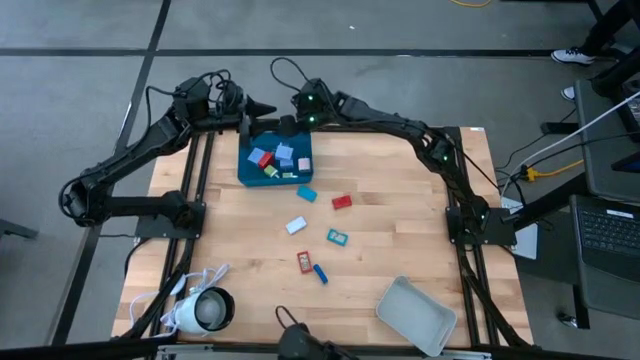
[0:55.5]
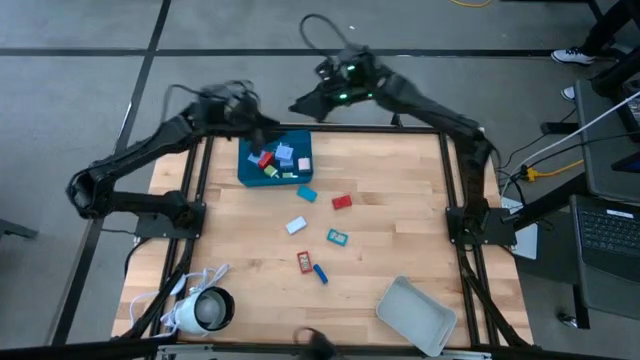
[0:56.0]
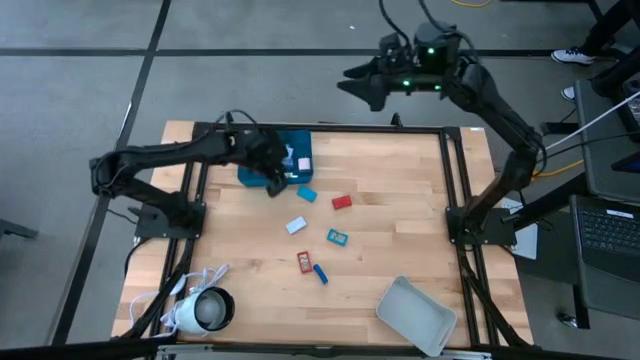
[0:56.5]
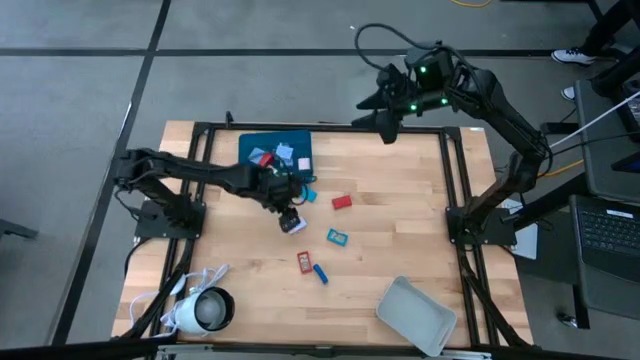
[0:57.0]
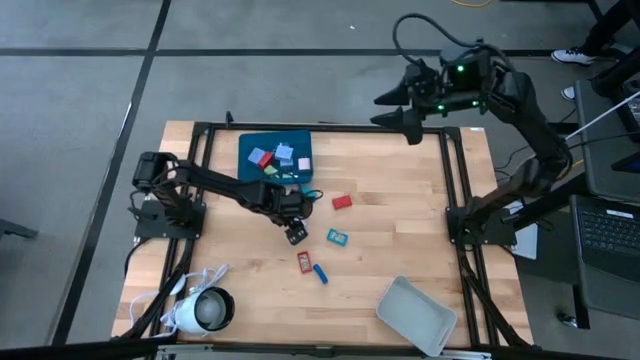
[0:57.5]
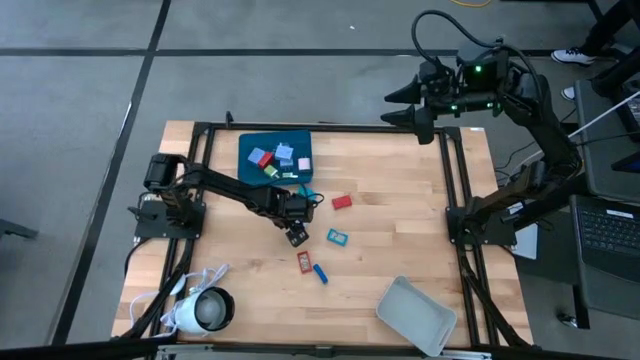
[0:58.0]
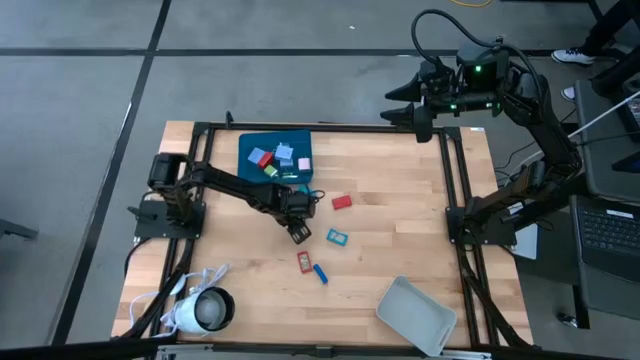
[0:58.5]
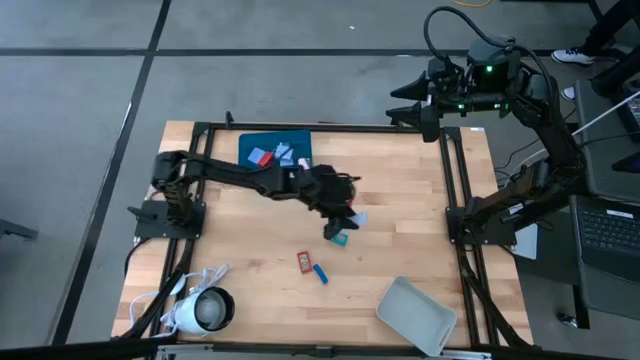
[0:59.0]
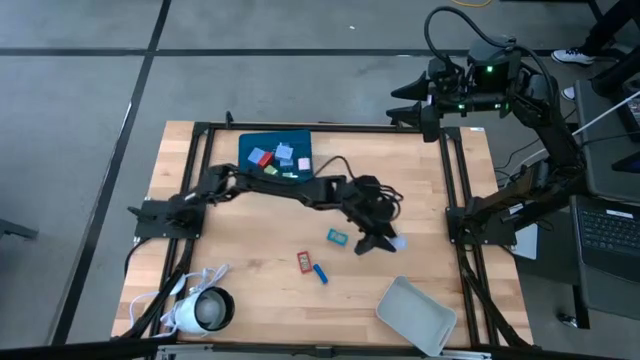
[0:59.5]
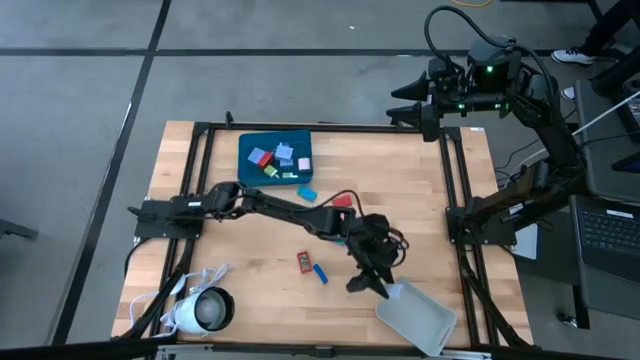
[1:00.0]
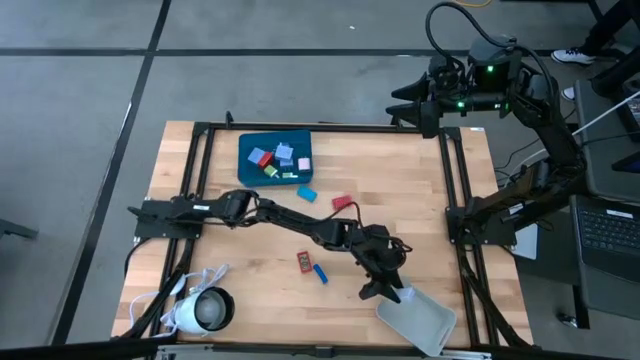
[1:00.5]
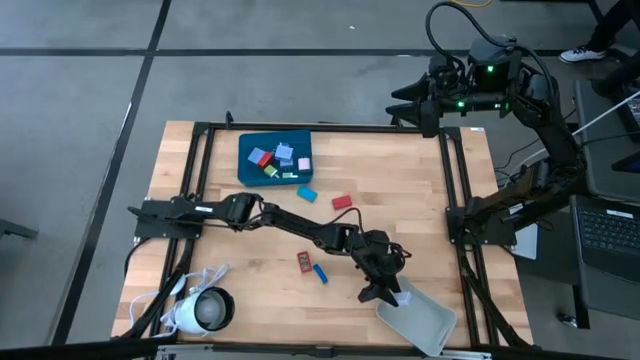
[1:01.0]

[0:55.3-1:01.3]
Task: Pick & Place Office items
Put the white digital clock into the white bin

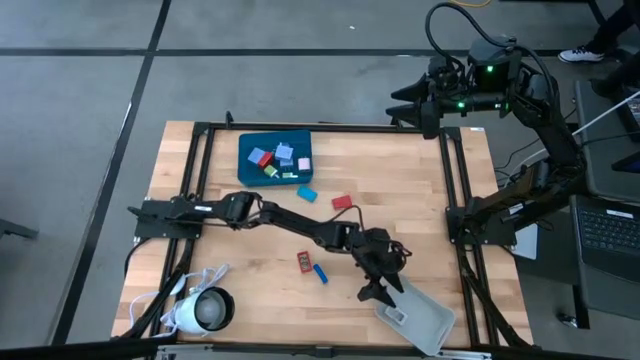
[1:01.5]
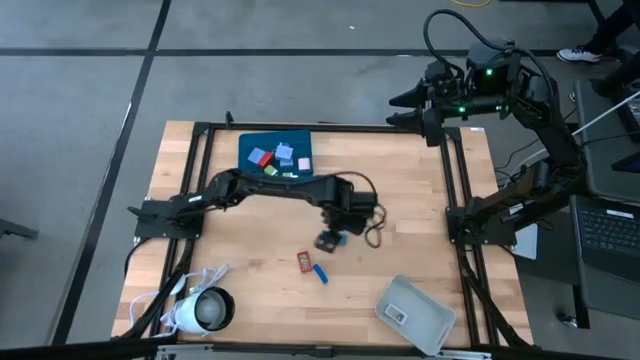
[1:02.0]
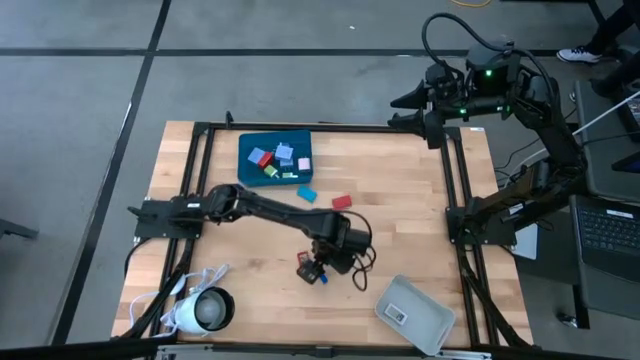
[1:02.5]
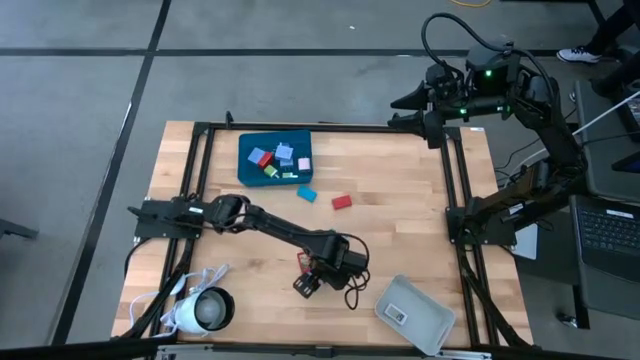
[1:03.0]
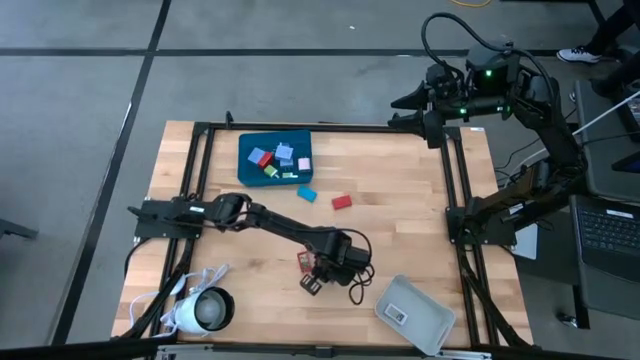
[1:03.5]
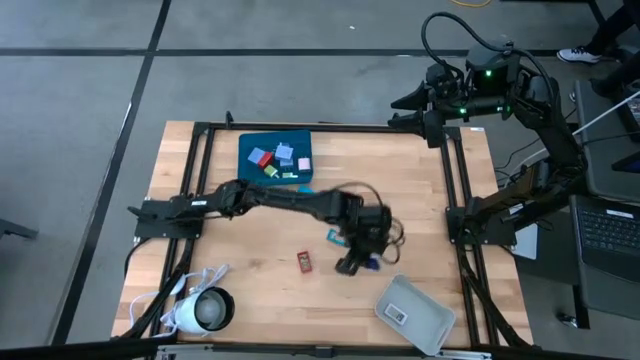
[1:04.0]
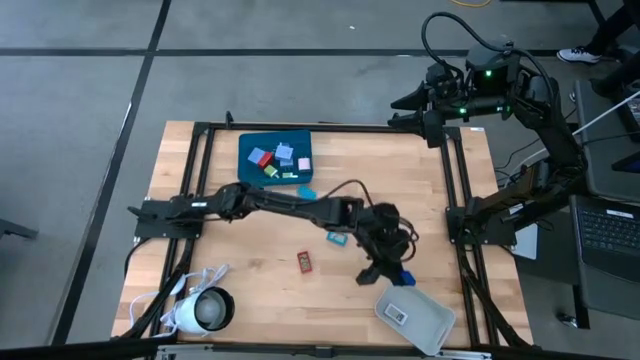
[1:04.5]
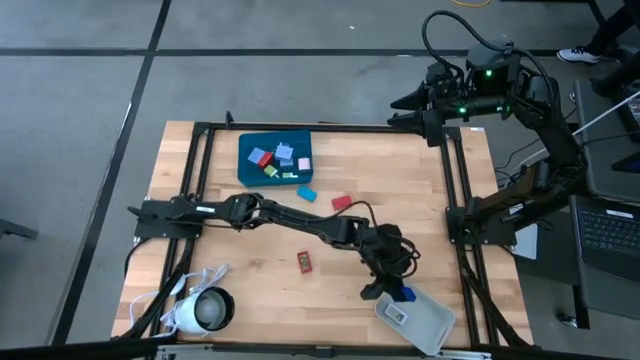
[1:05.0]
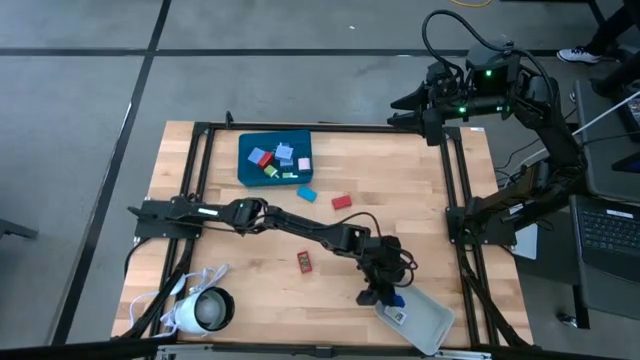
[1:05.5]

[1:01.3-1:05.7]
Put the dark blue digital clock into the white bin

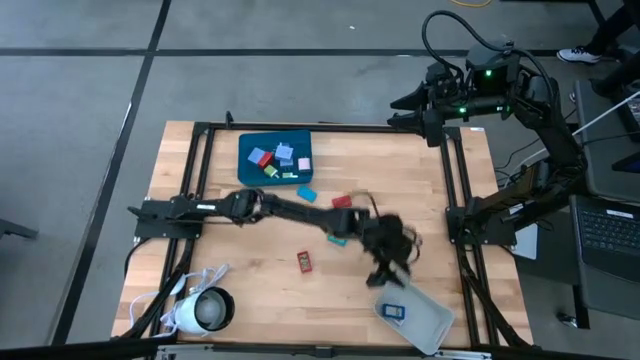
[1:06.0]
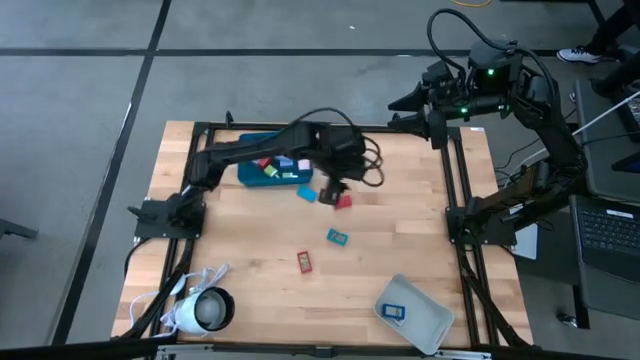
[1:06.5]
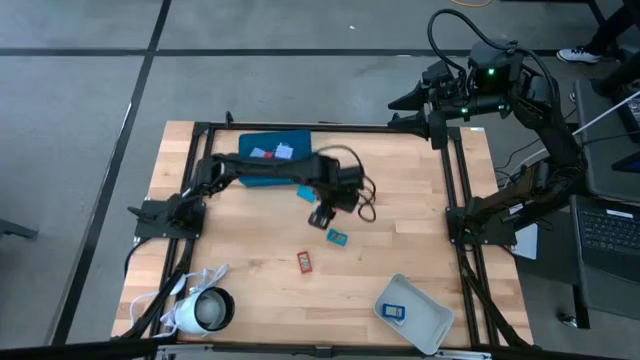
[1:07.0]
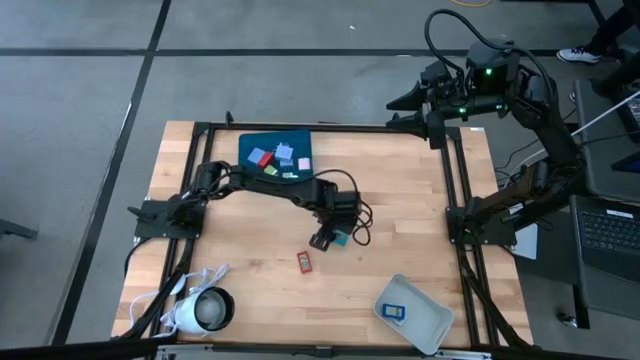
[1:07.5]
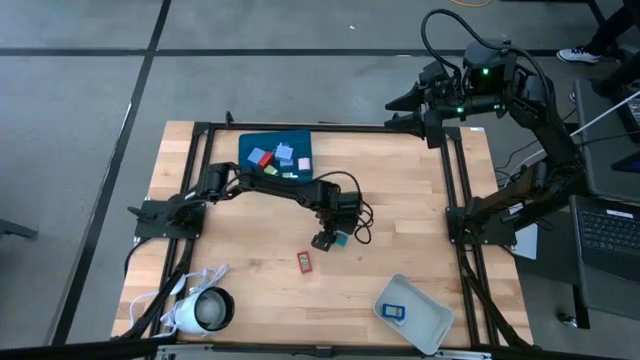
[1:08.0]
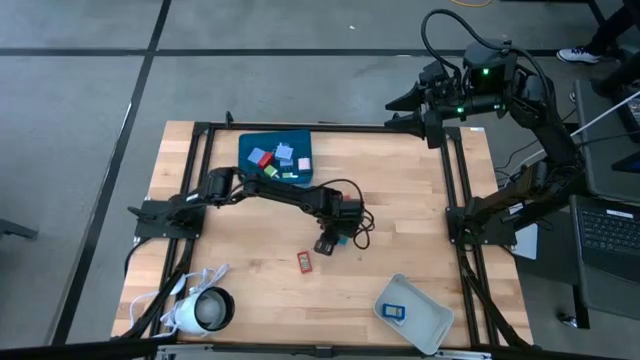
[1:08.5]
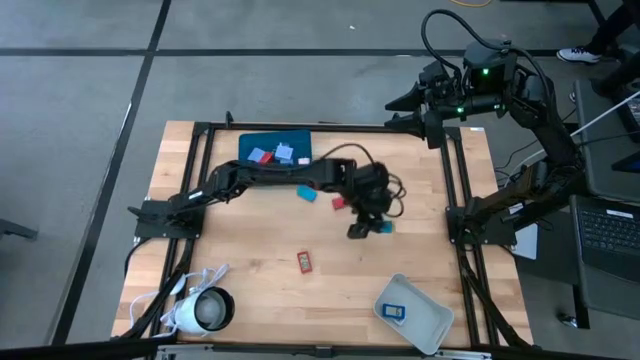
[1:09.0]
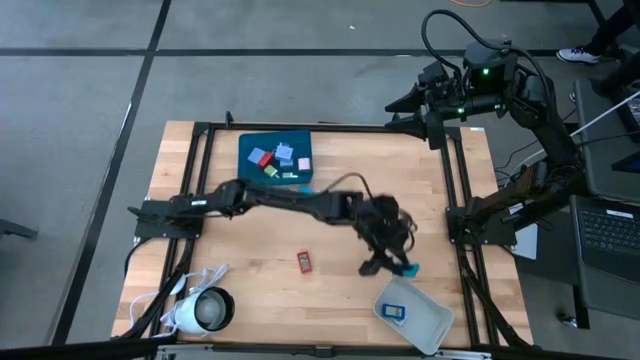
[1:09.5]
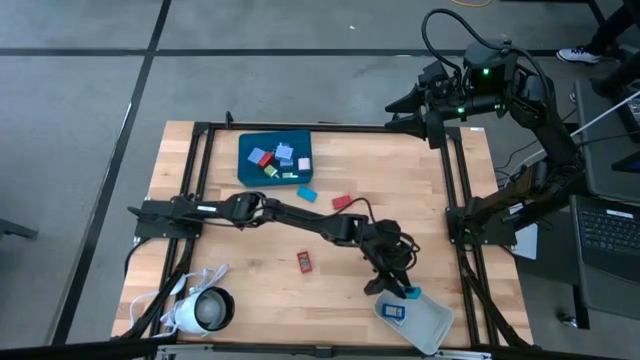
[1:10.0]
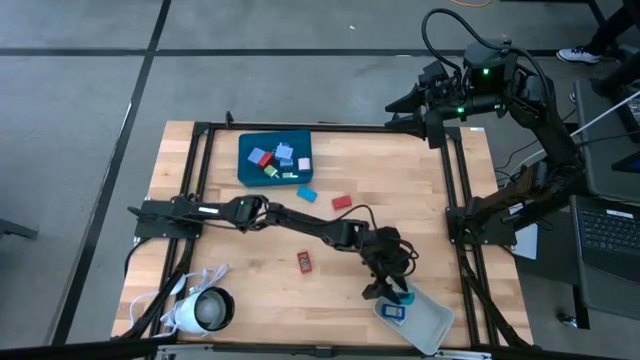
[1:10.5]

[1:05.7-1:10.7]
Put the bottom light blue digital clock into the white bin

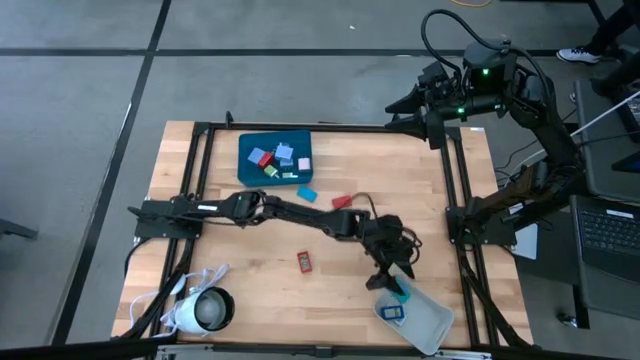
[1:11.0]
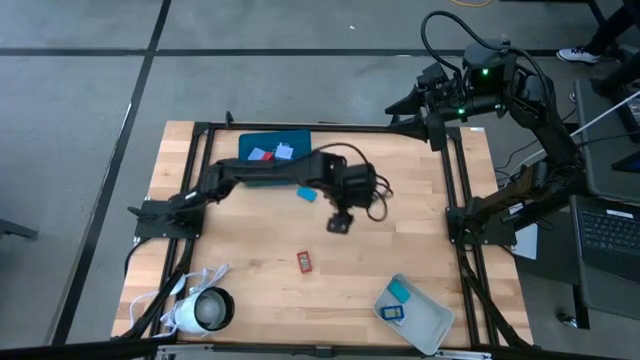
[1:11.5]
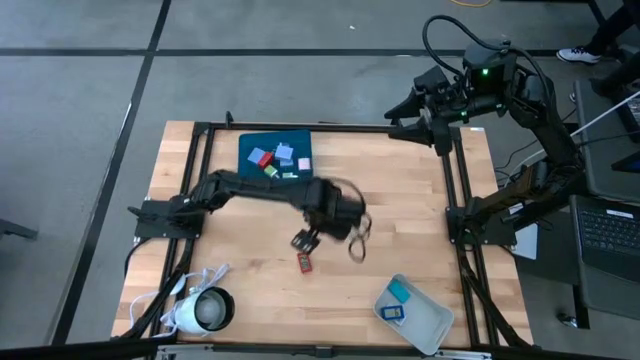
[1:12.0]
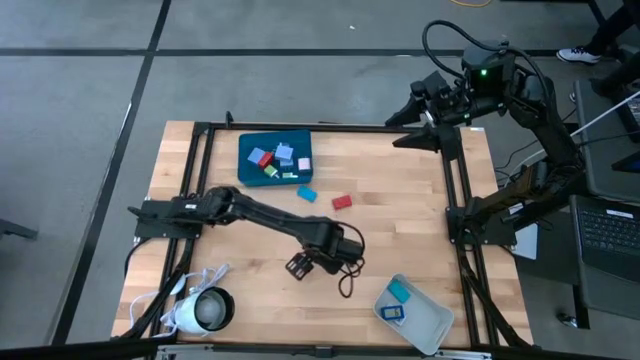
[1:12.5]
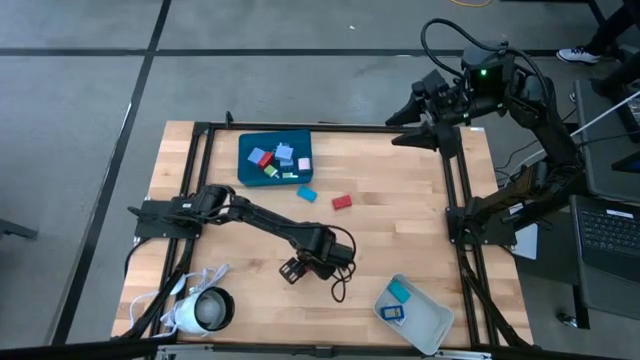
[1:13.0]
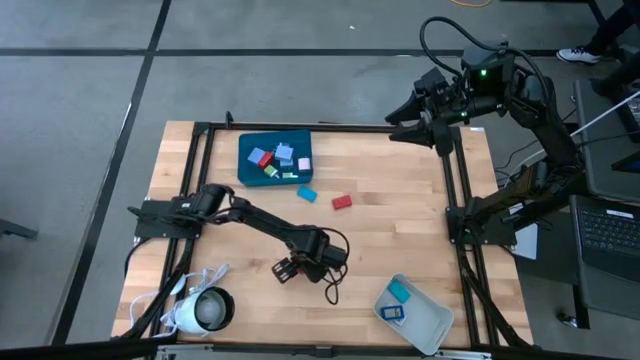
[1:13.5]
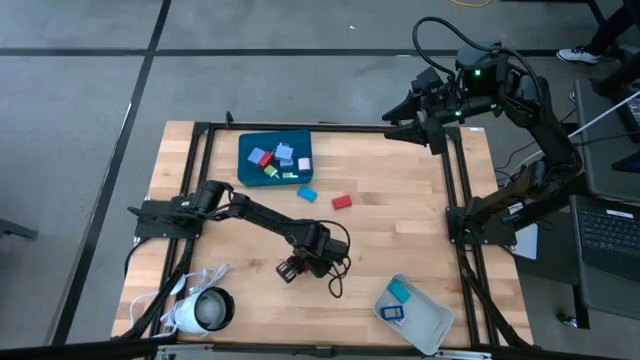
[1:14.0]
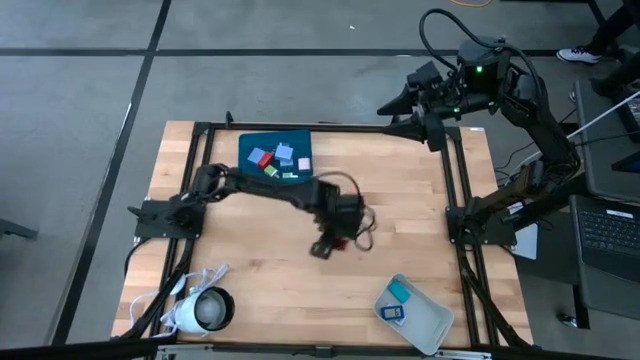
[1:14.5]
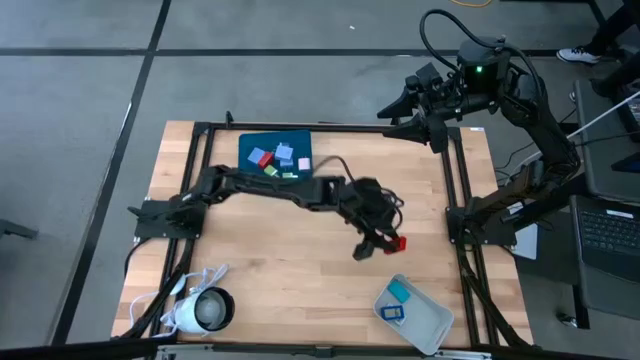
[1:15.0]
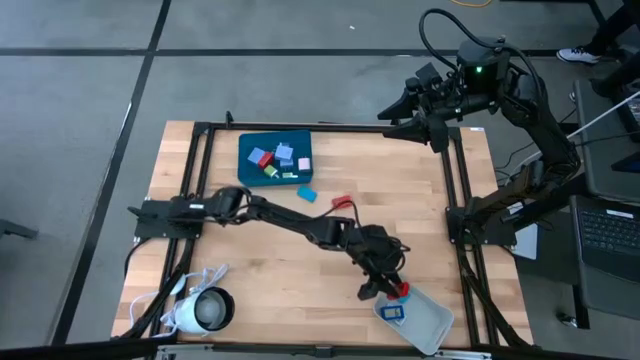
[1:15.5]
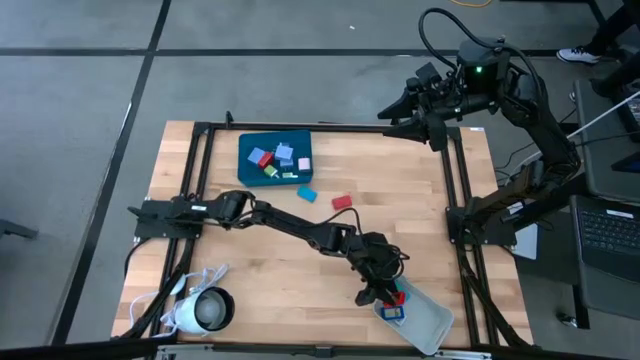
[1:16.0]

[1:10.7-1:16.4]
Put the bottom red digital clock into the white bin
